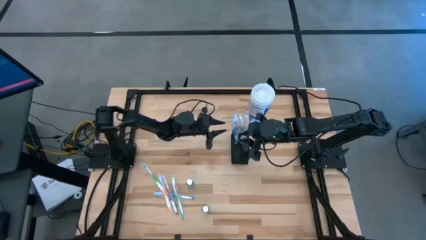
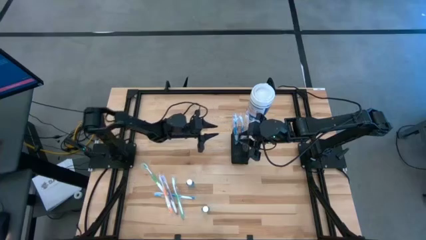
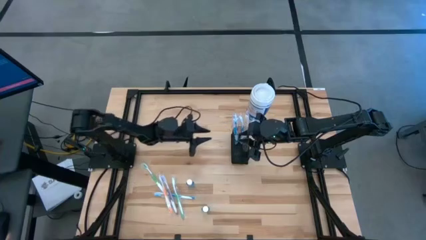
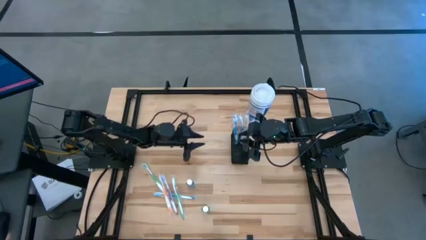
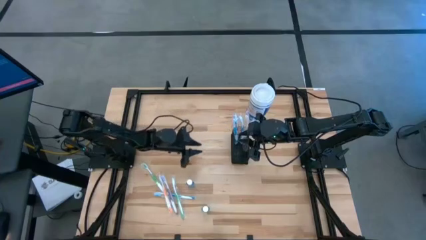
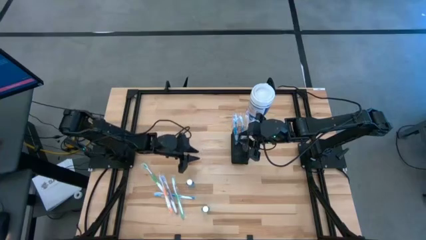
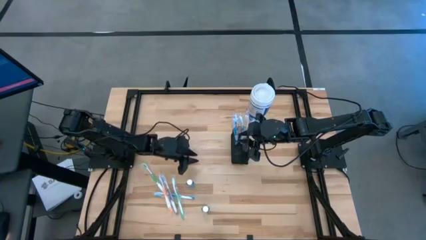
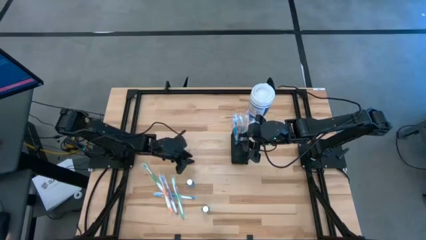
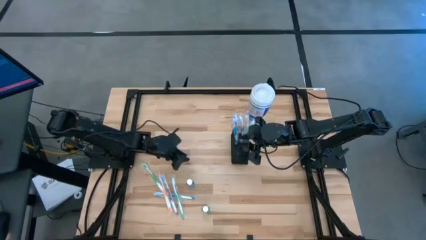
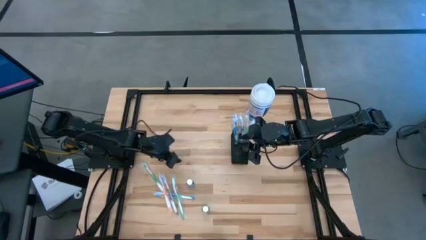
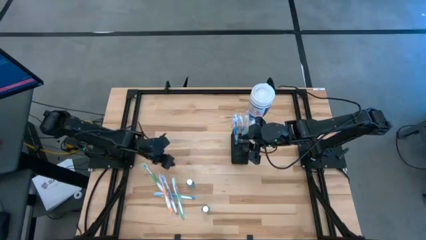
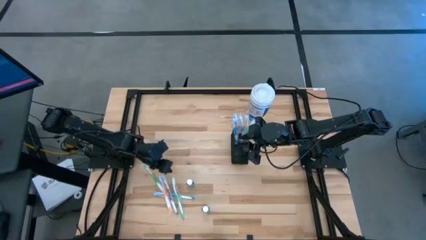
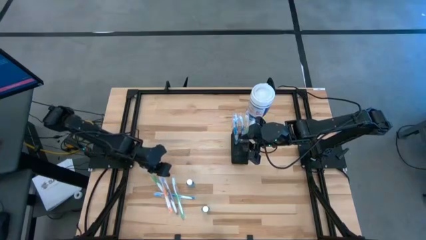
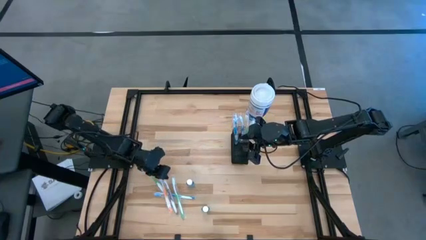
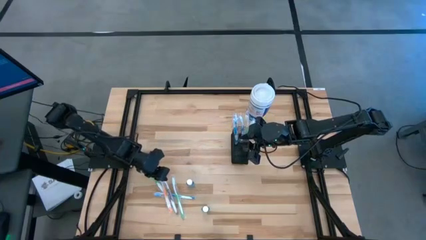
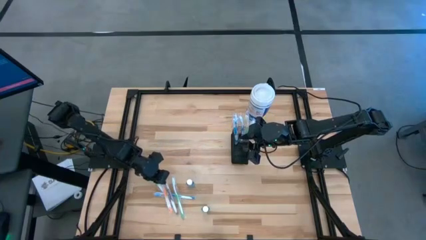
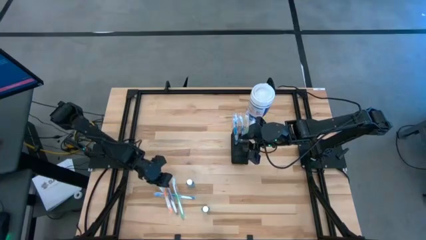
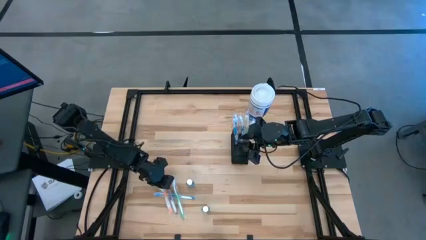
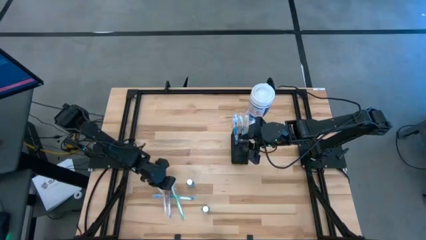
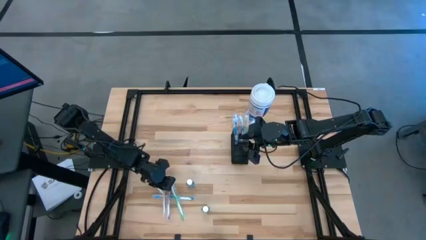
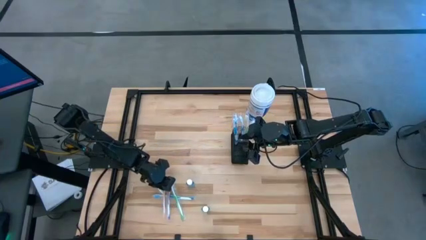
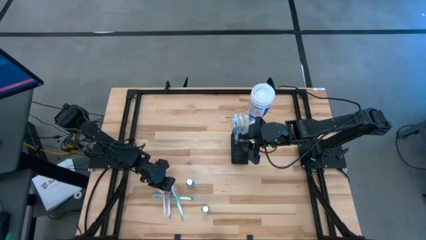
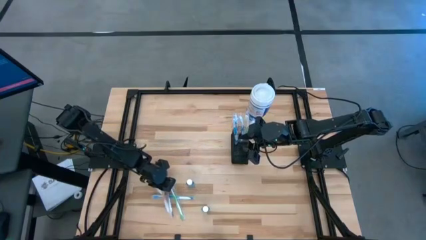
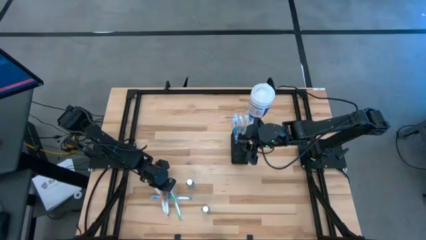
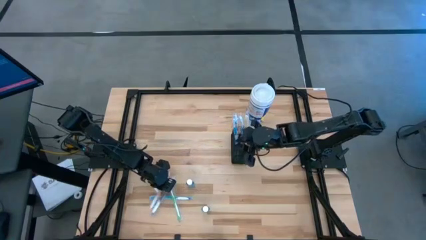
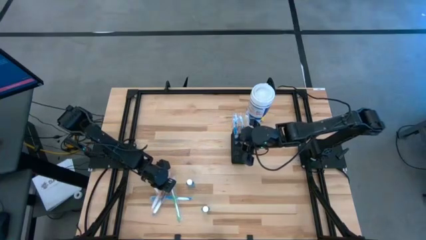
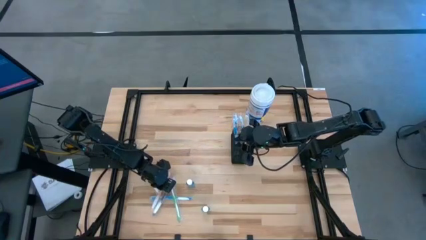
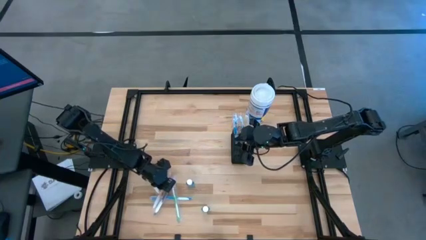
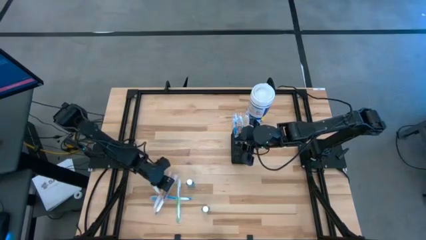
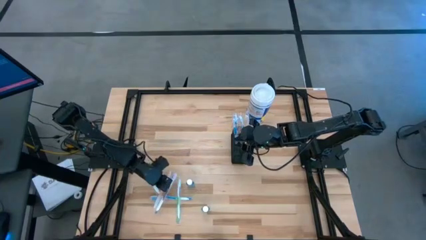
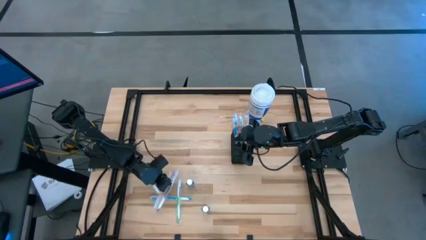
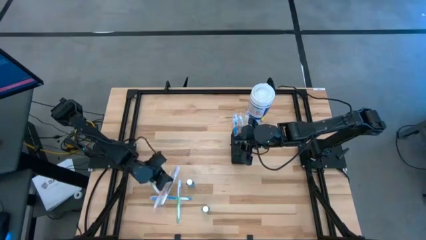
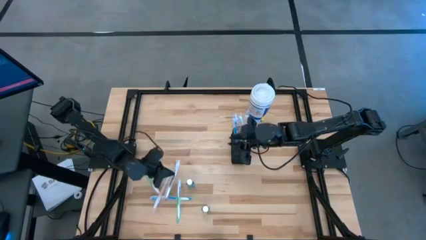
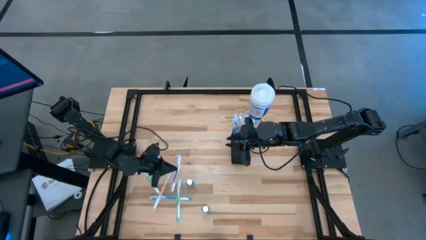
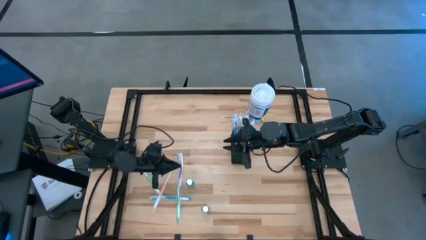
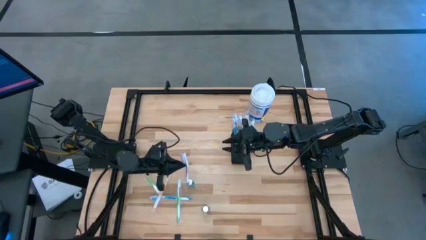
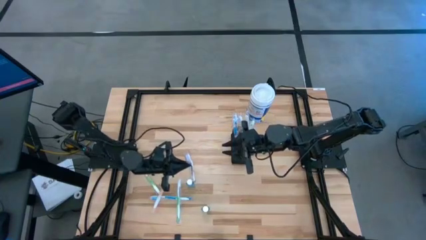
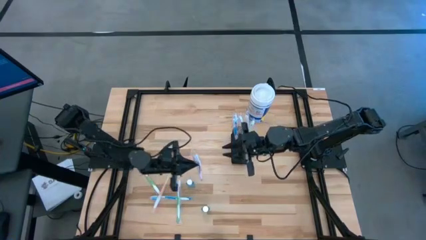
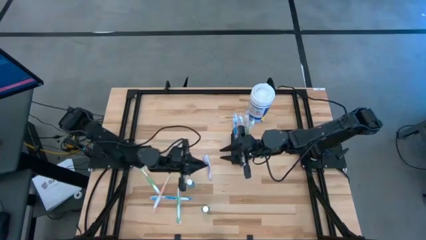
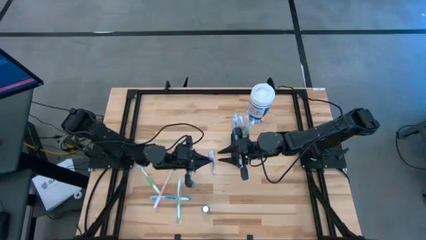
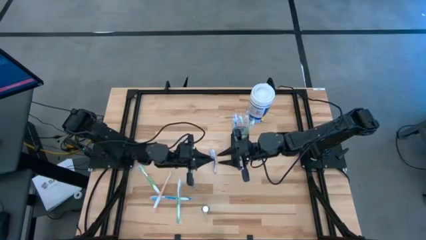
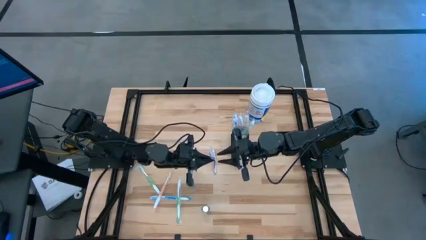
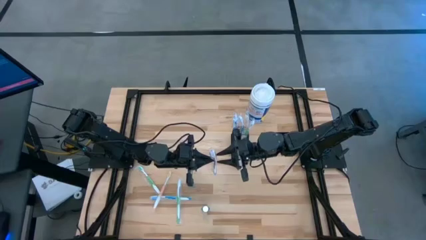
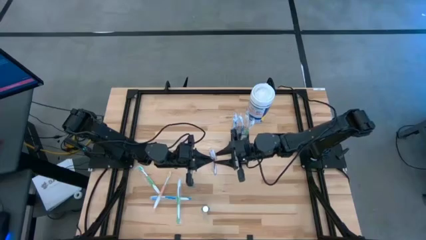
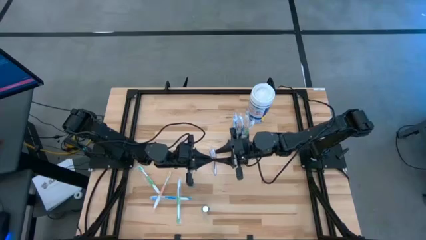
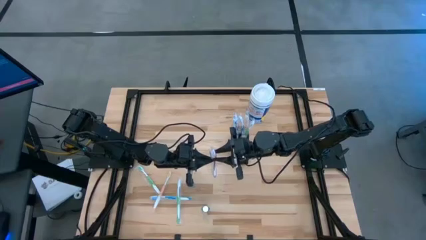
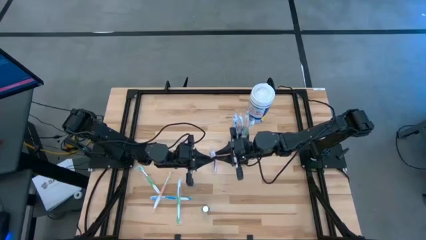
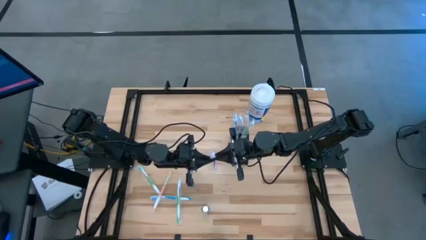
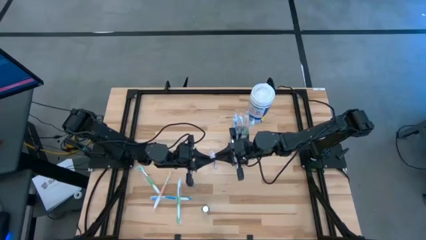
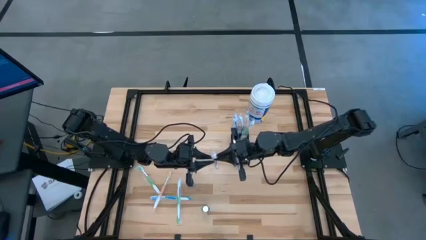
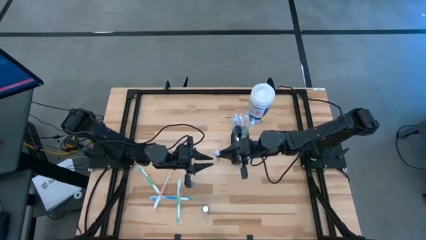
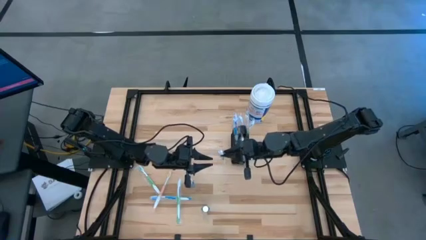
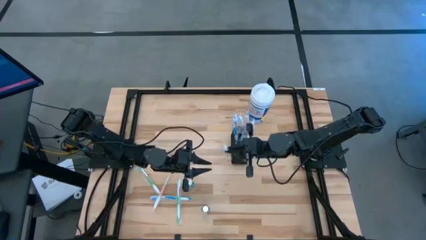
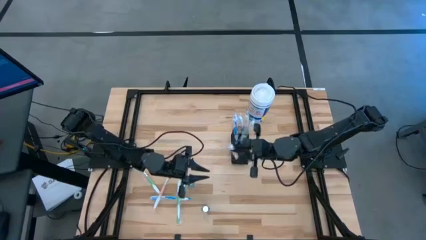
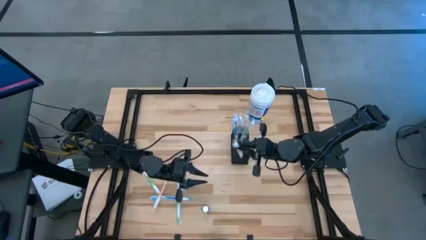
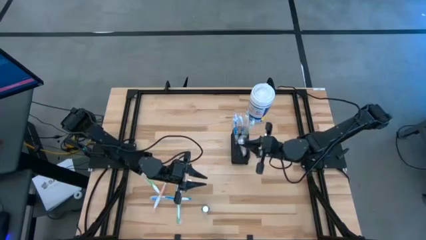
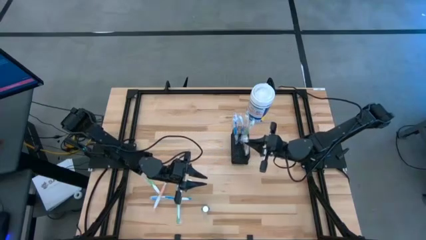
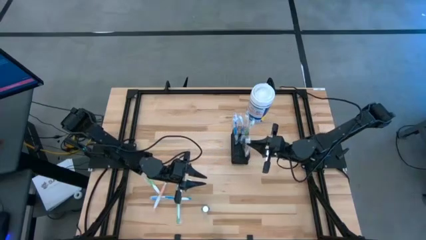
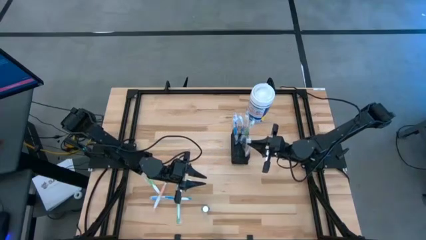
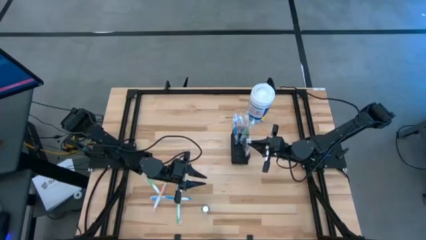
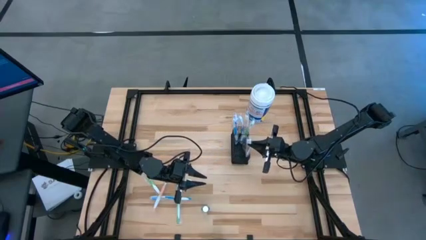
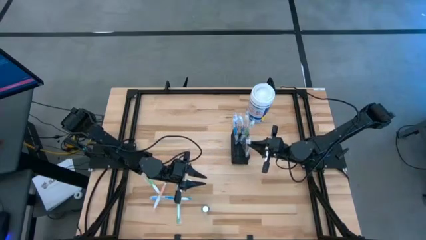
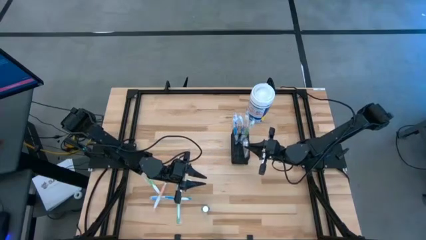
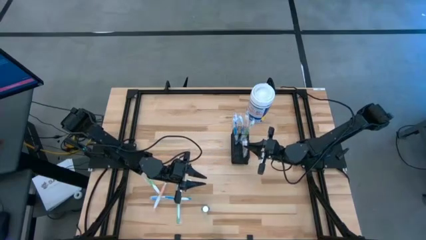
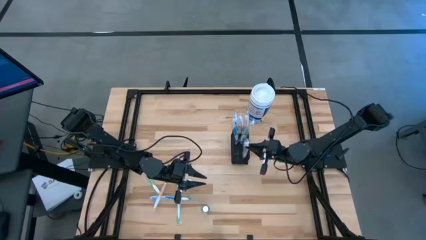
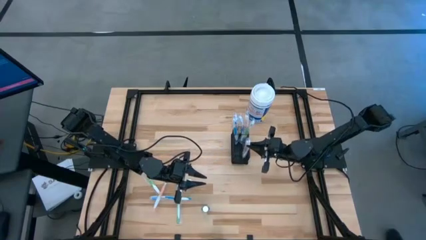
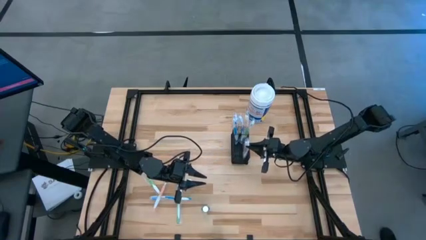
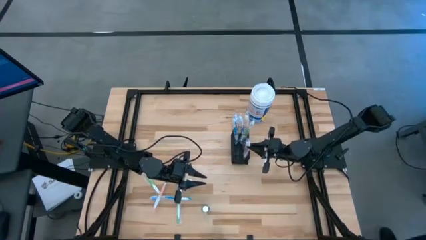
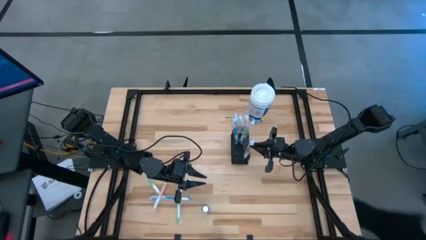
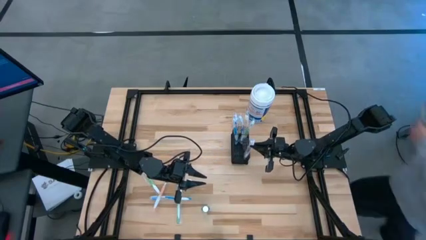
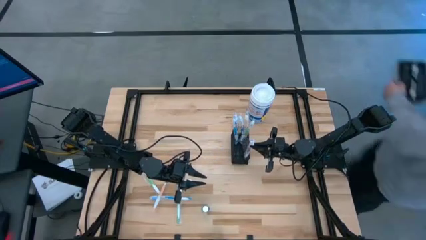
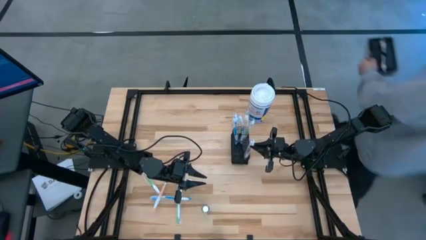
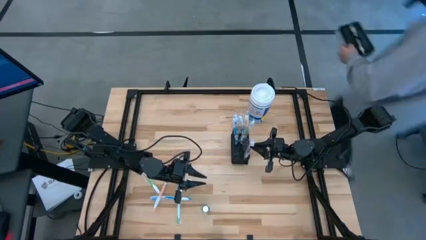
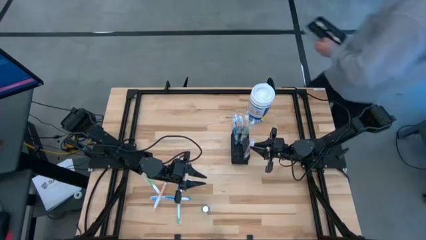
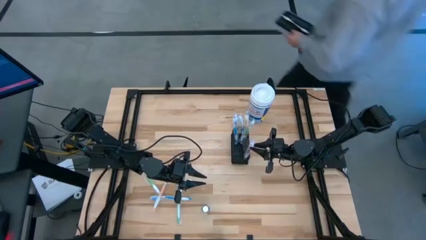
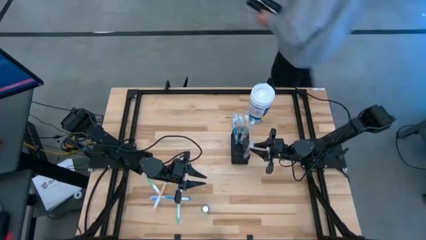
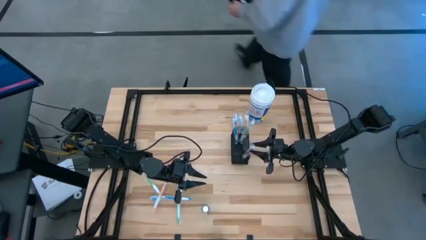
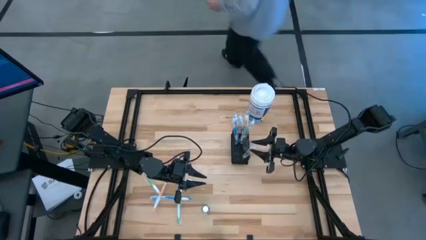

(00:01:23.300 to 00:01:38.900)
Task: Pick & Place toothbrushing station
Put the purple toothbrush into the wire mesh organizer

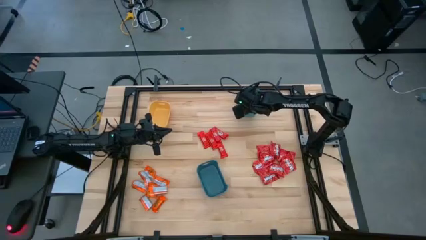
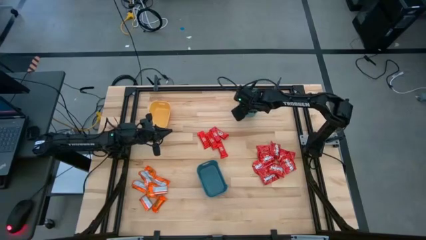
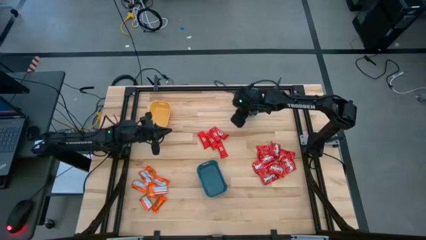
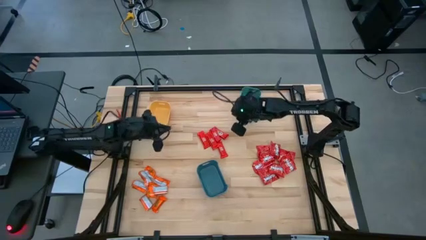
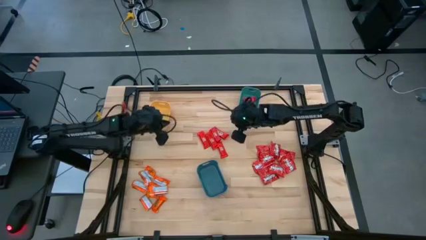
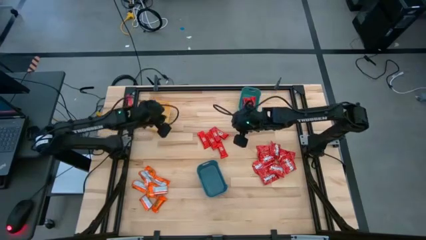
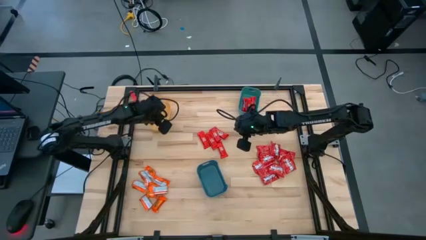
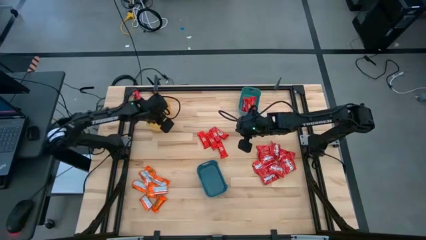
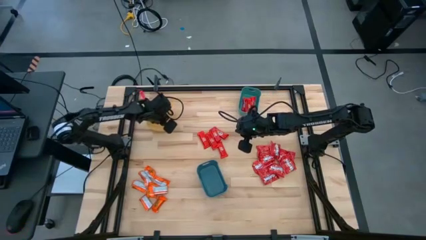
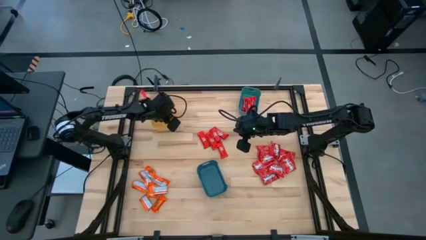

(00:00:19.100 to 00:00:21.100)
Task: Sort candy
Adjust the yellow bin
